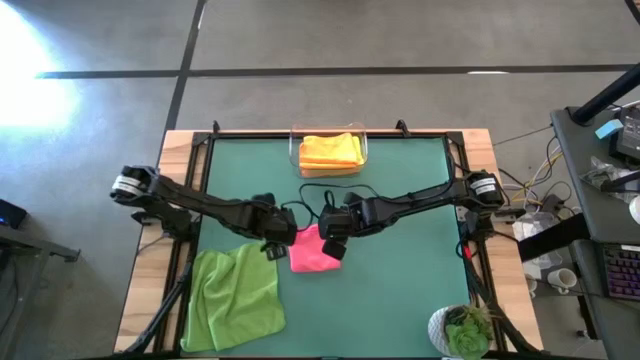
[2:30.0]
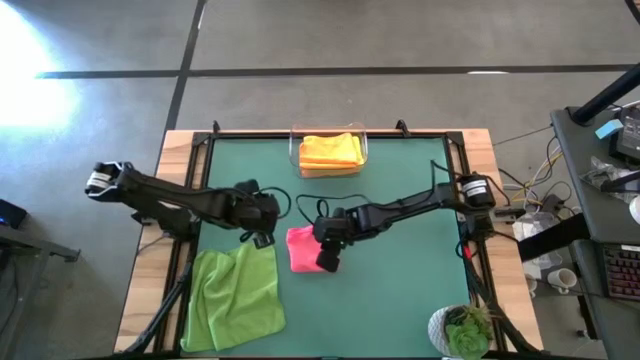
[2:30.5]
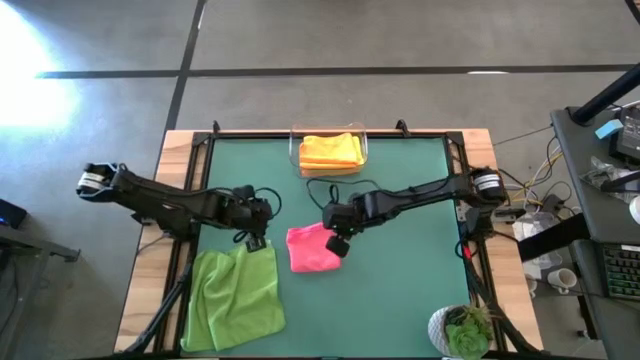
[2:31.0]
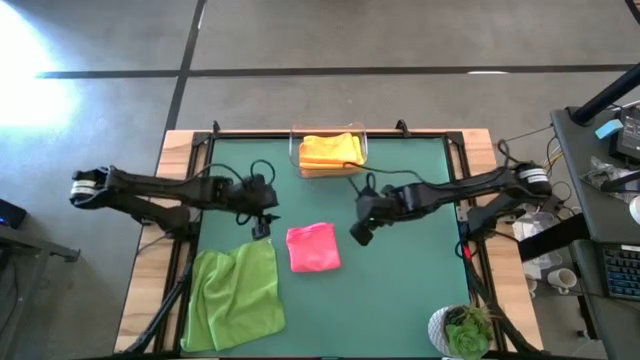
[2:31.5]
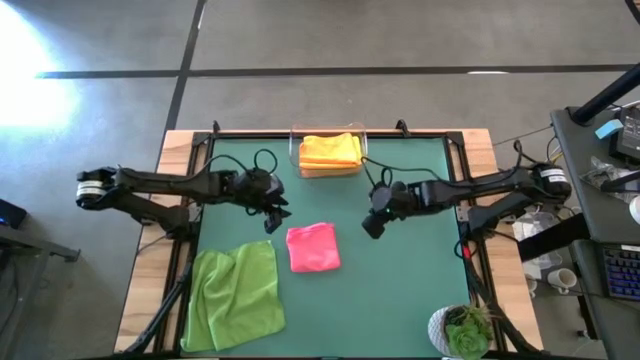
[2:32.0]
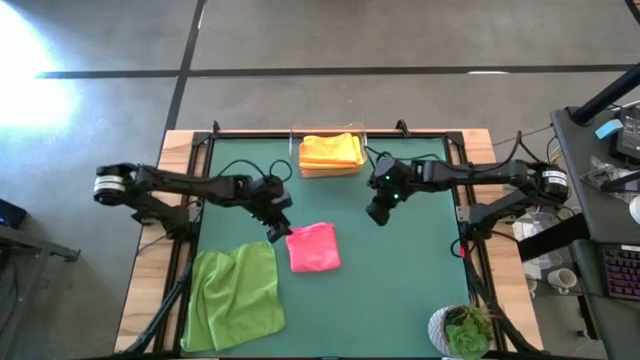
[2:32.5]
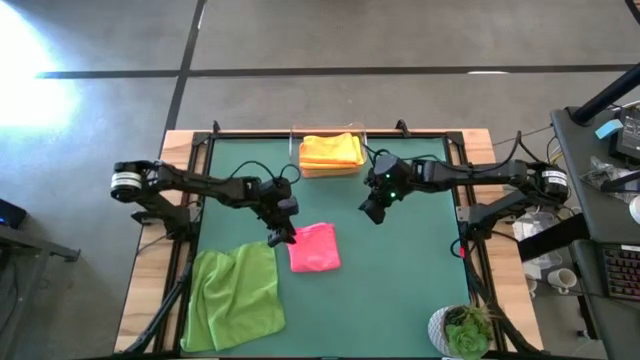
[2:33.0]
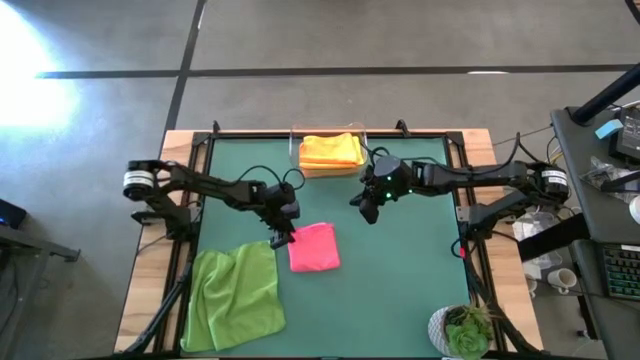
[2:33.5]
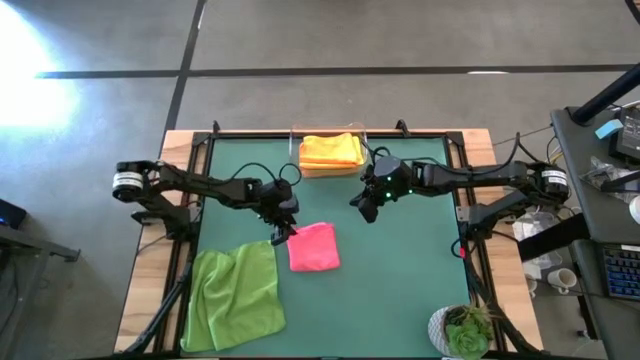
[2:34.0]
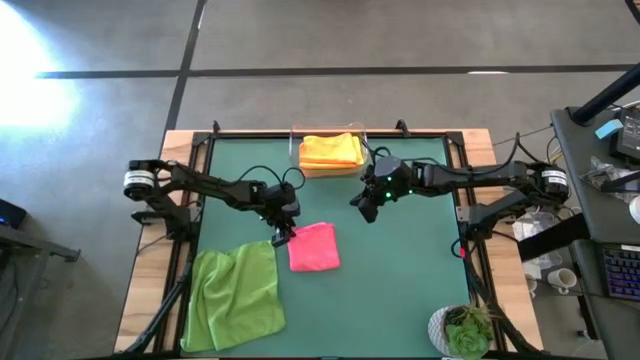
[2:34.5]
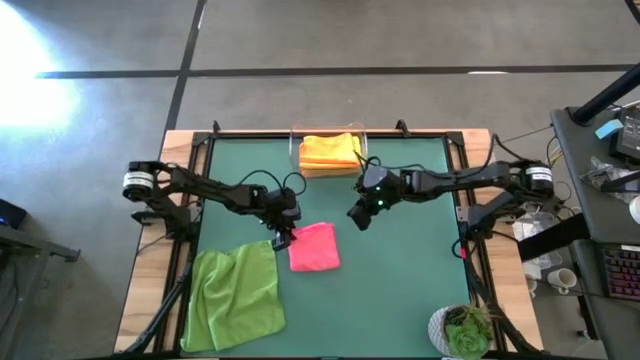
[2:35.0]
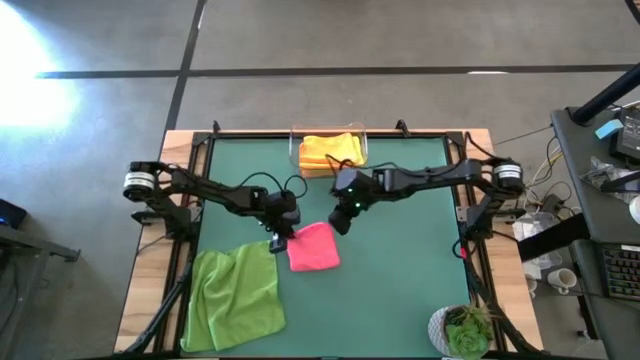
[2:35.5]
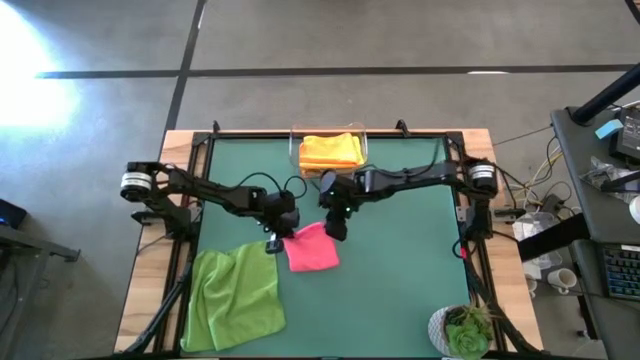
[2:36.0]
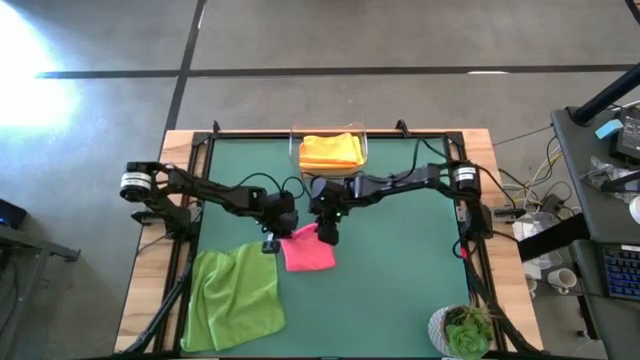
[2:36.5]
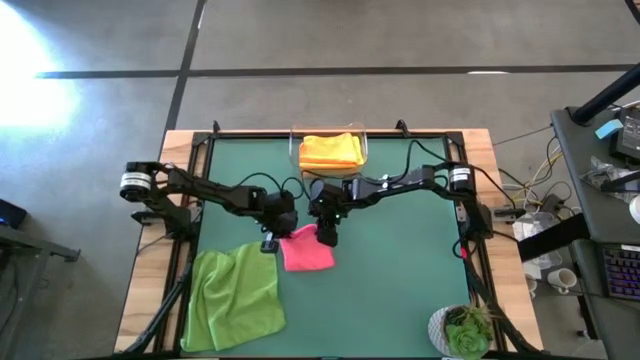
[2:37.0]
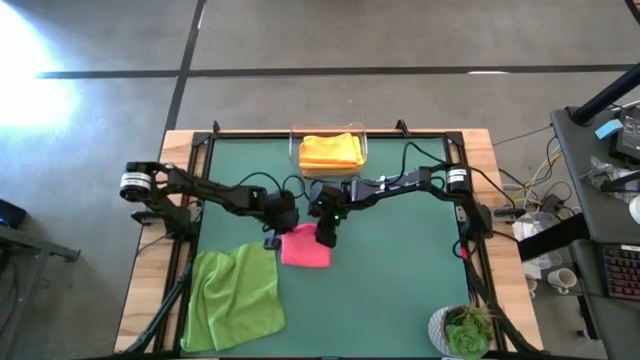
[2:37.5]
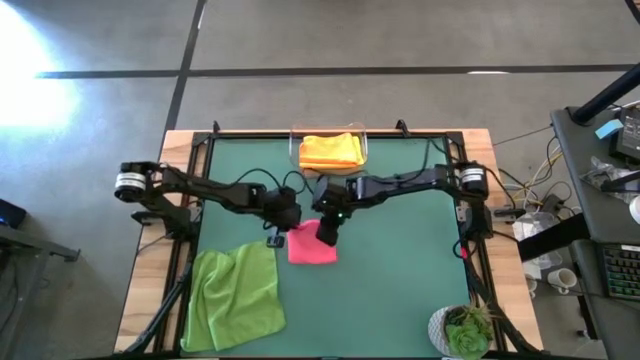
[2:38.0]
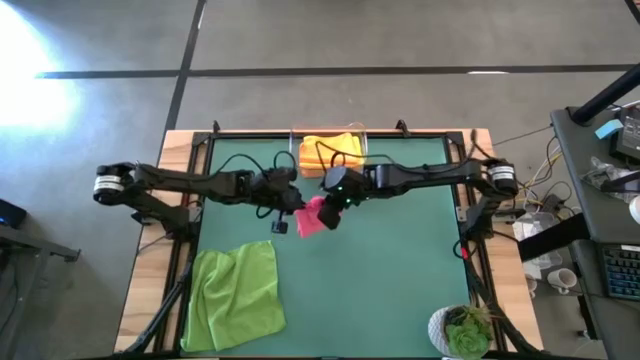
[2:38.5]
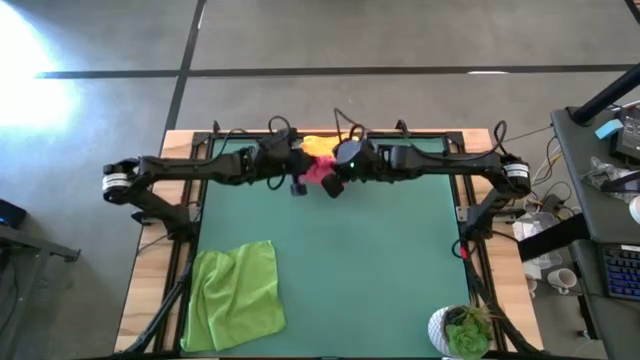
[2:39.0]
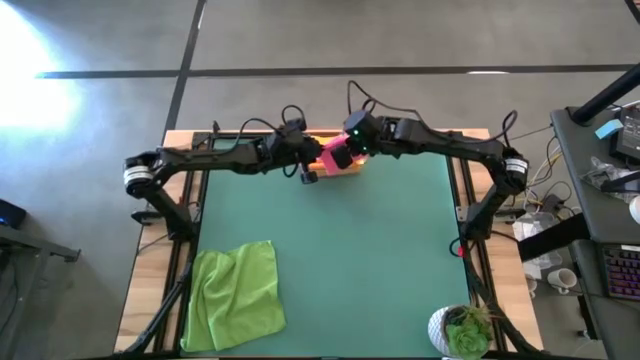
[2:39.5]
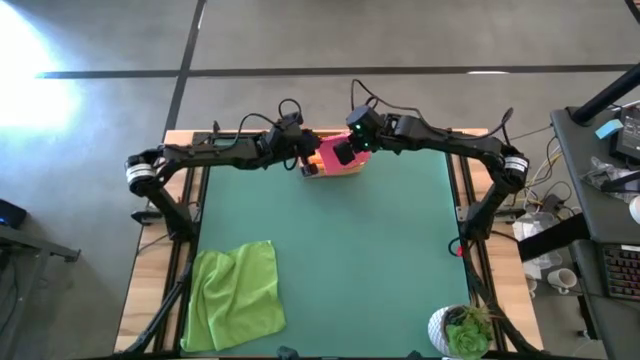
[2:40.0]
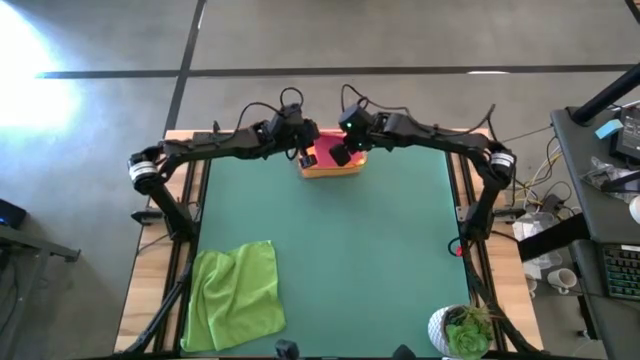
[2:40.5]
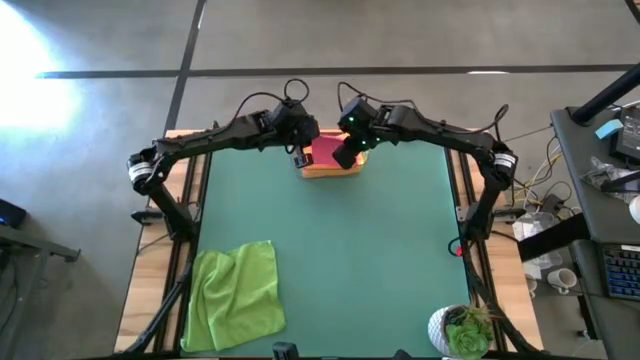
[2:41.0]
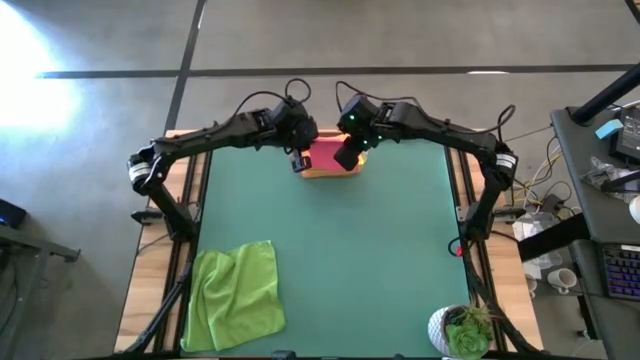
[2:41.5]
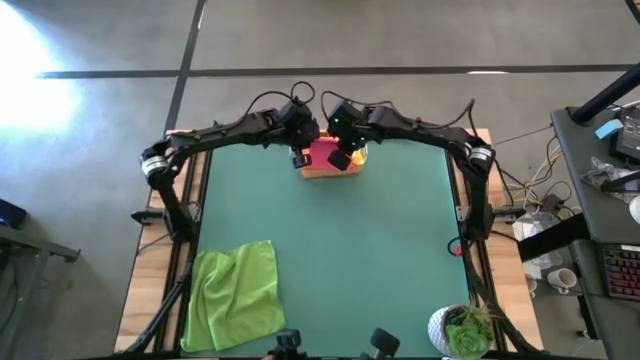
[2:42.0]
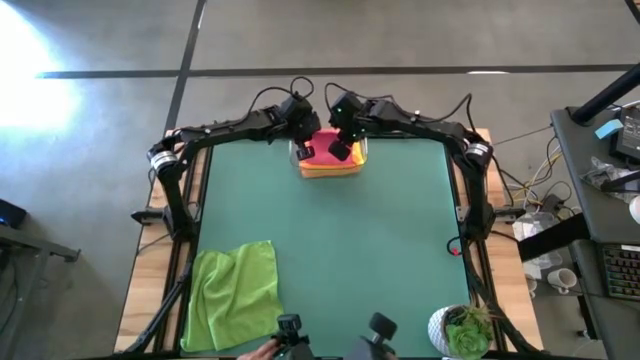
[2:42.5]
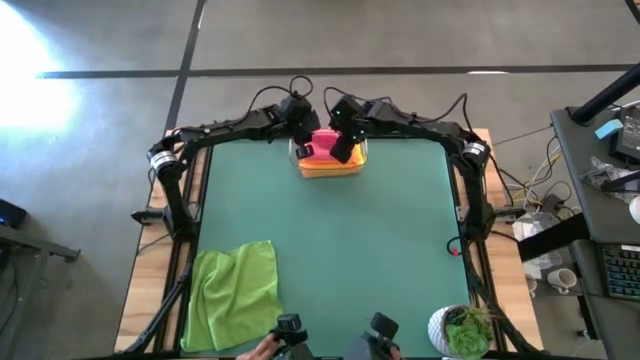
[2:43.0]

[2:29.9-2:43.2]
Task: Fold microfiber towels
Stack the pink microfiber towel on top of the orange microfiber towel

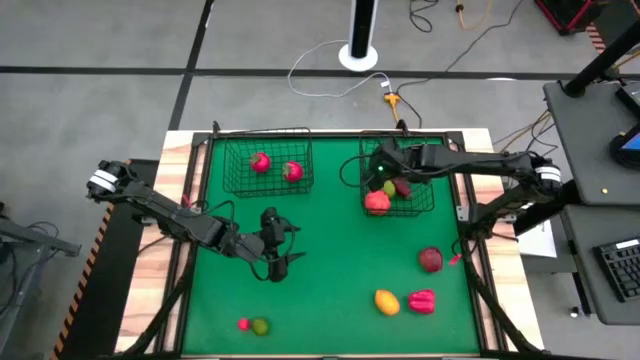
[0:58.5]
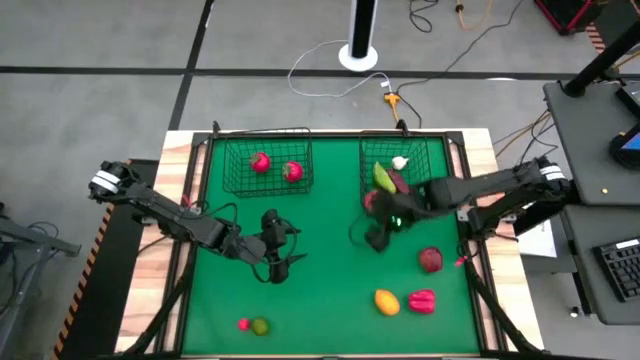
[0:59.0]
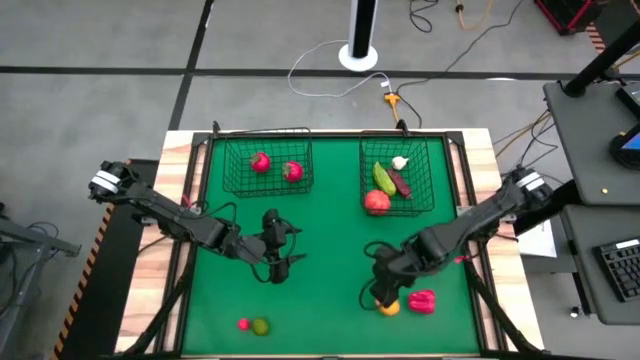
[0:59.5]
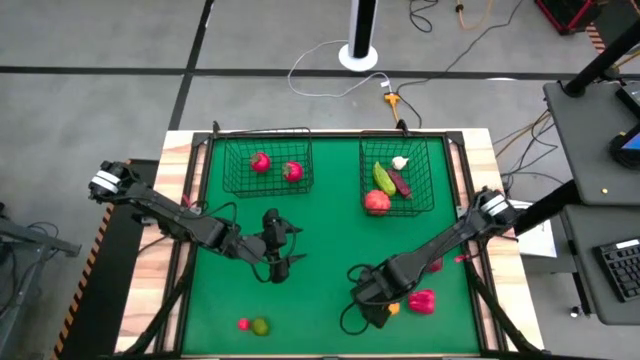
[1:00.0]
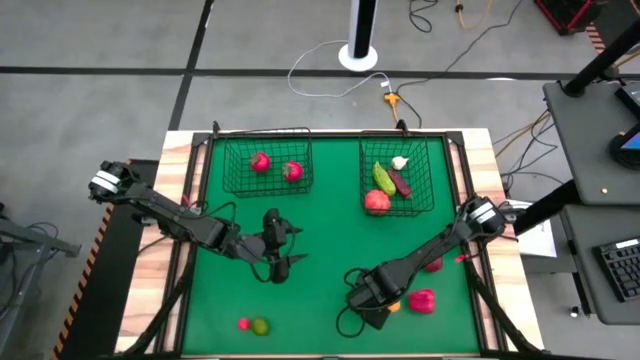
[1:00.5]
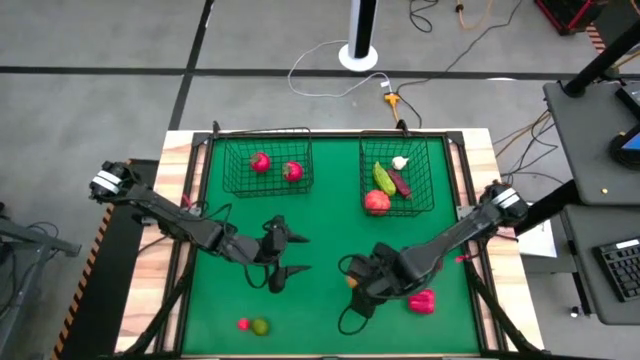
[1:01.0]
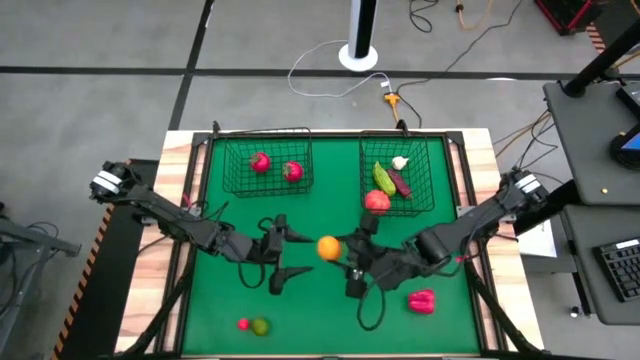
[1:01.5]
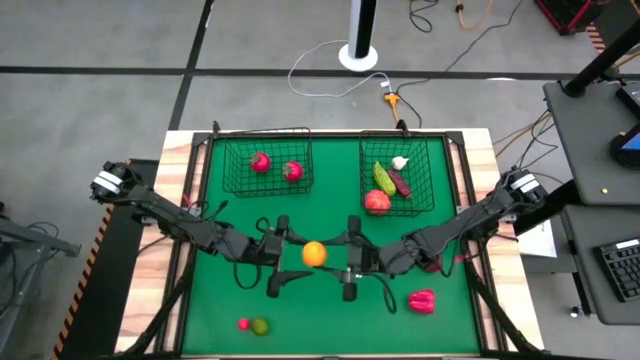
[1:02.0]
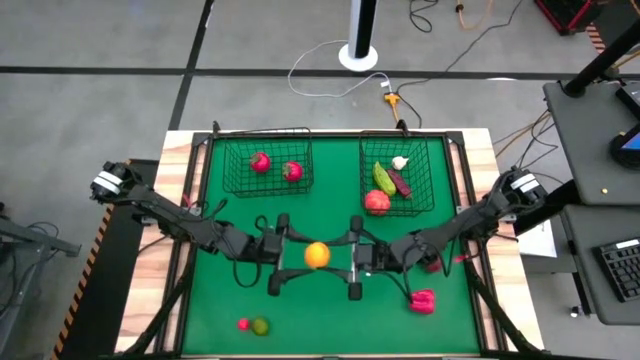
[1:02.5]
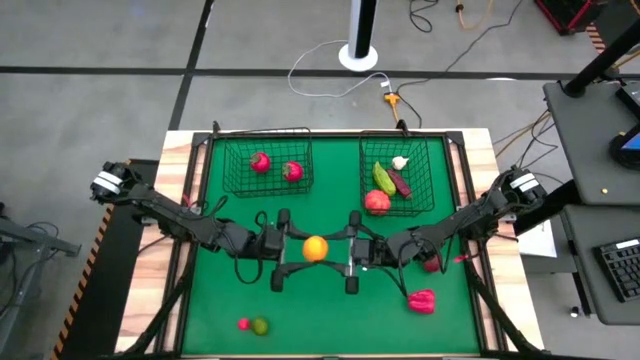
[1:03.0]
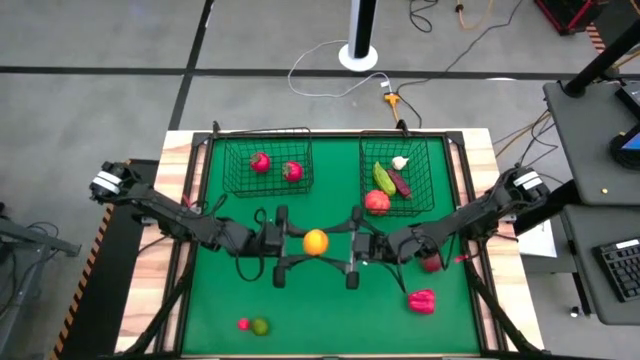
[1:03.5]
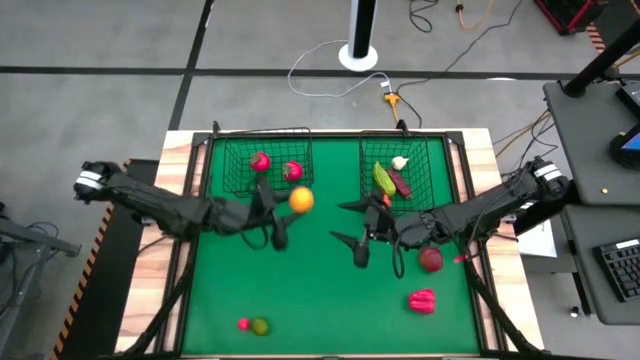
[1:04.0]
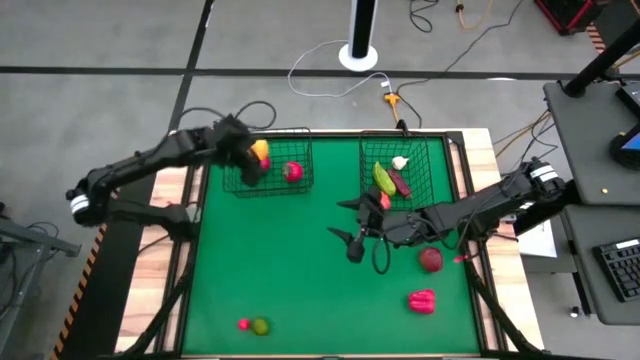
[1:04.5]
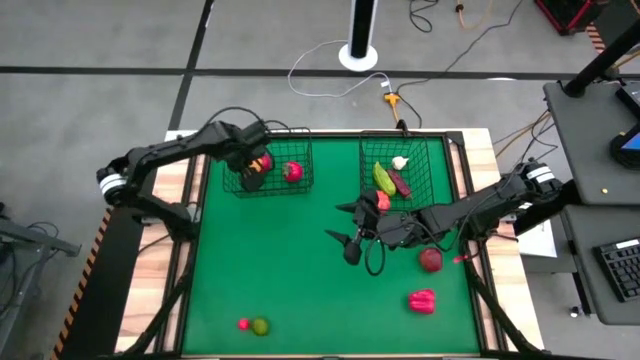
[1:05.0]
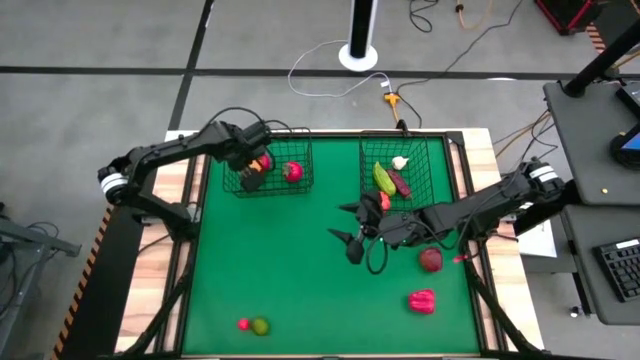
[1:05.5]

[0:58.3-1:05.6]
Task: Sort produce into baskets
Put the yellow lemon into the left wire basket
